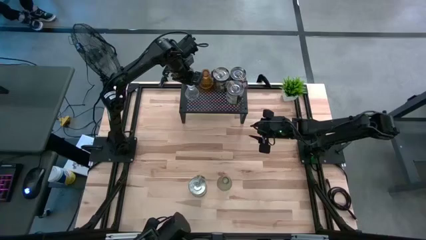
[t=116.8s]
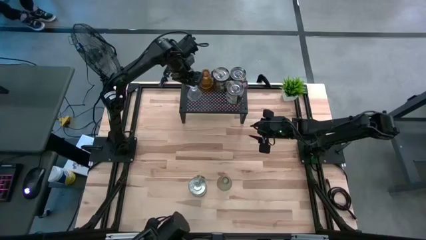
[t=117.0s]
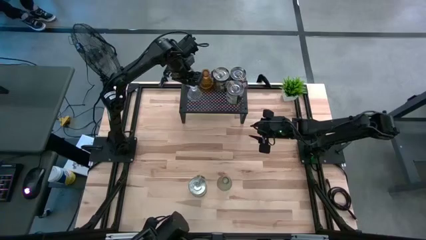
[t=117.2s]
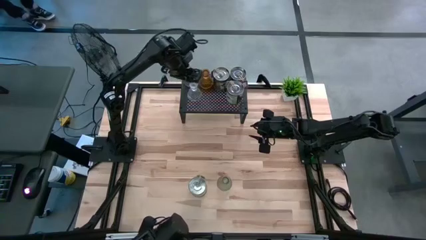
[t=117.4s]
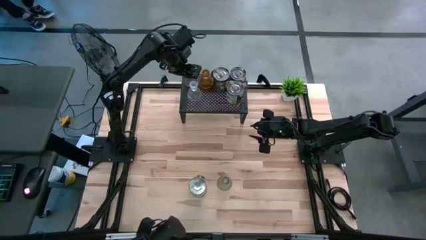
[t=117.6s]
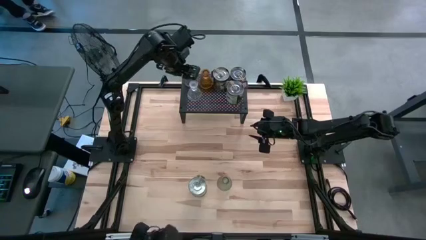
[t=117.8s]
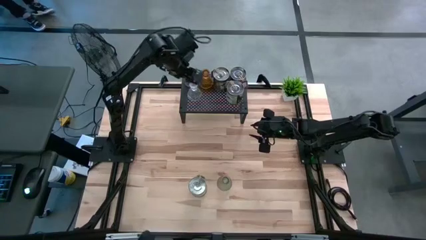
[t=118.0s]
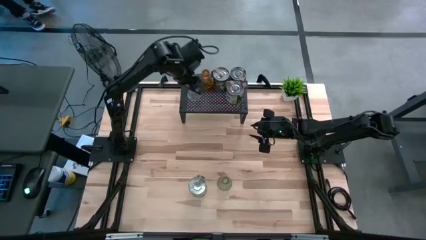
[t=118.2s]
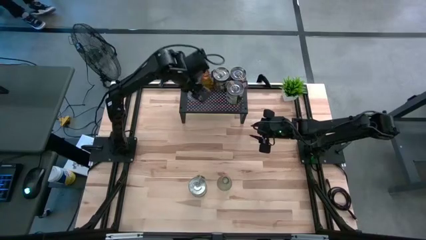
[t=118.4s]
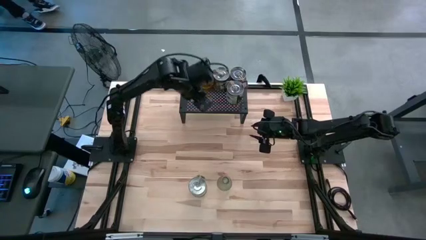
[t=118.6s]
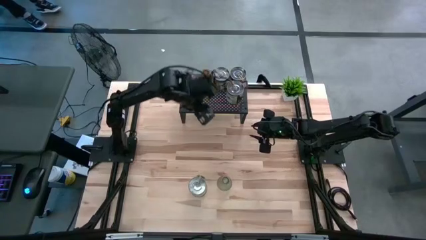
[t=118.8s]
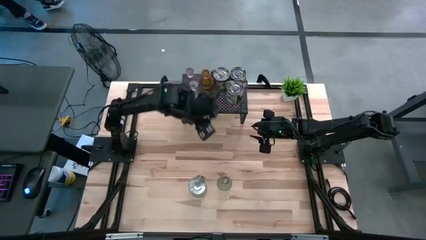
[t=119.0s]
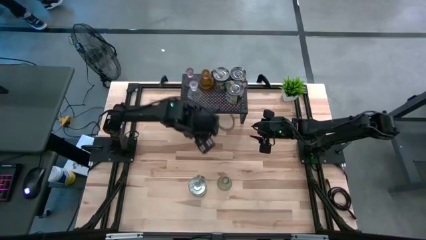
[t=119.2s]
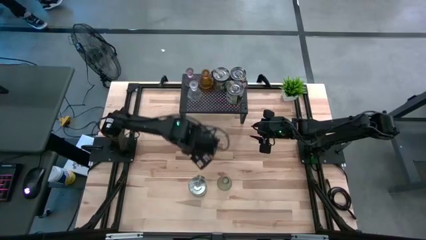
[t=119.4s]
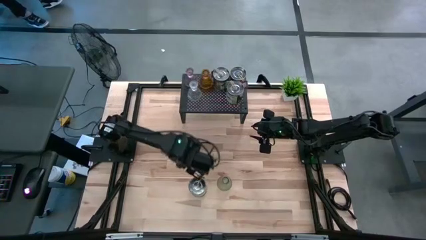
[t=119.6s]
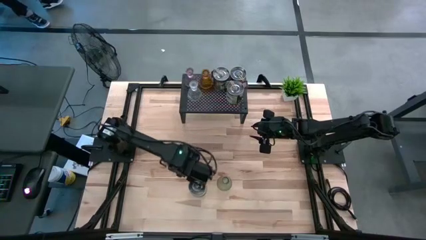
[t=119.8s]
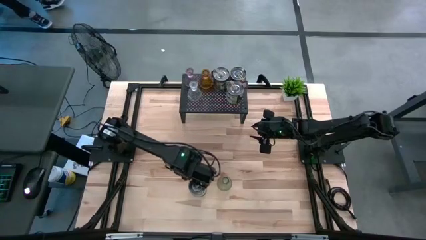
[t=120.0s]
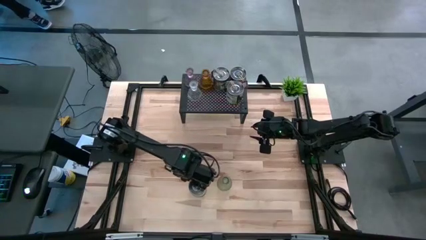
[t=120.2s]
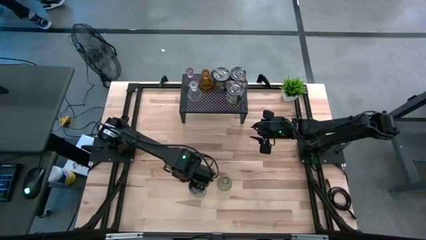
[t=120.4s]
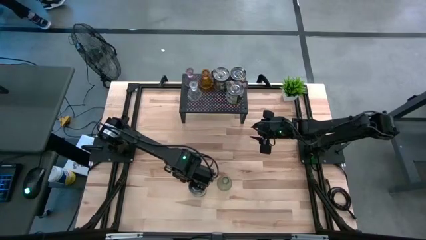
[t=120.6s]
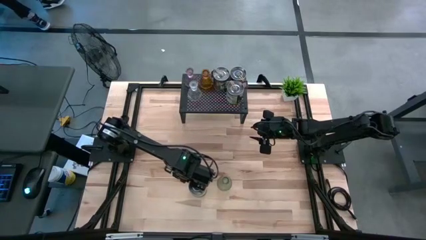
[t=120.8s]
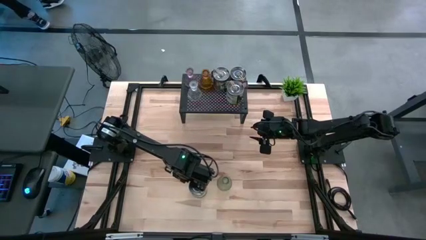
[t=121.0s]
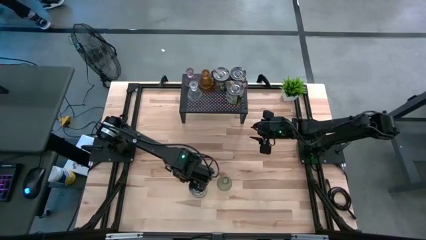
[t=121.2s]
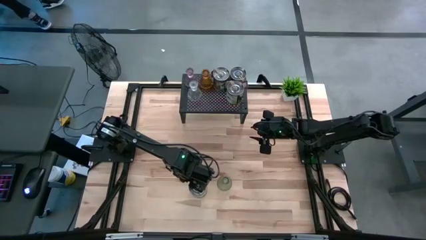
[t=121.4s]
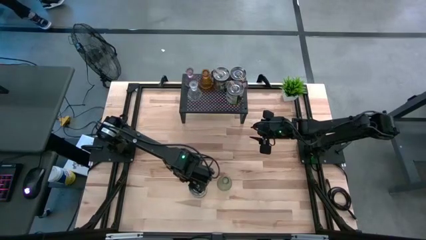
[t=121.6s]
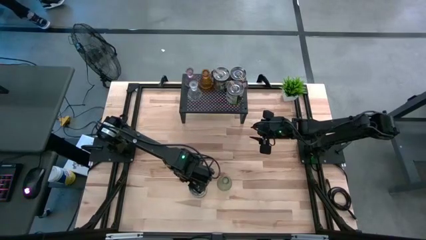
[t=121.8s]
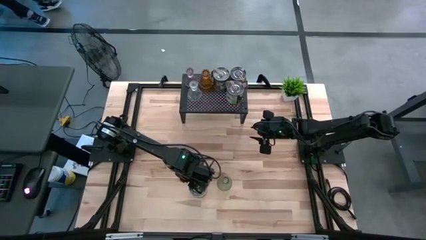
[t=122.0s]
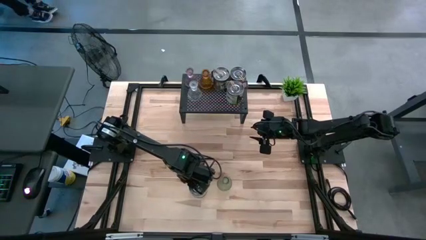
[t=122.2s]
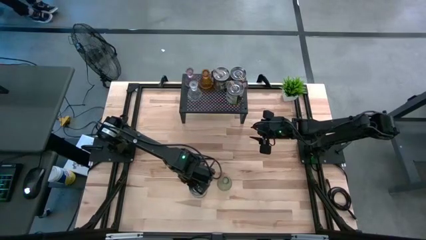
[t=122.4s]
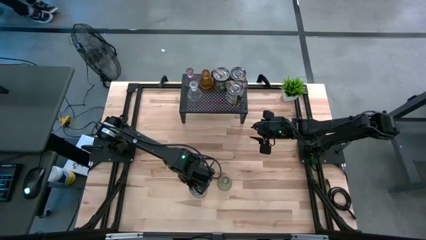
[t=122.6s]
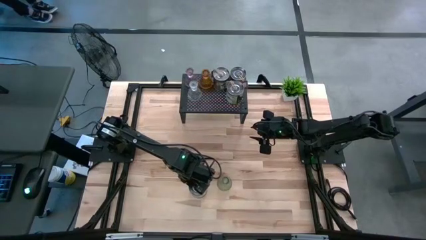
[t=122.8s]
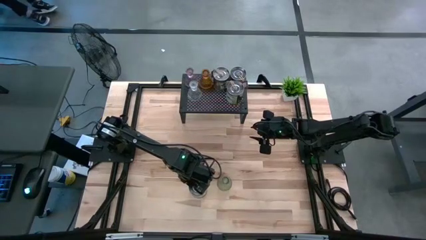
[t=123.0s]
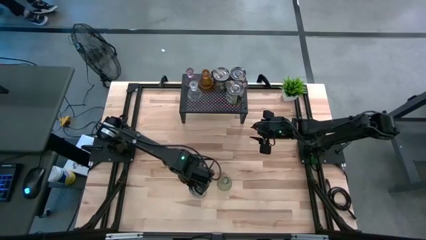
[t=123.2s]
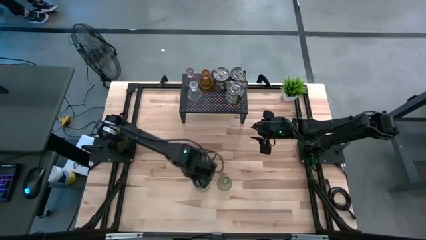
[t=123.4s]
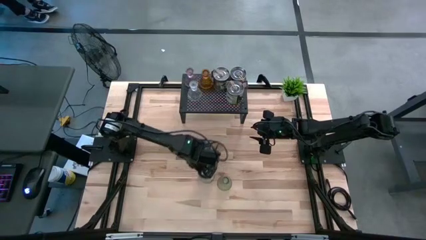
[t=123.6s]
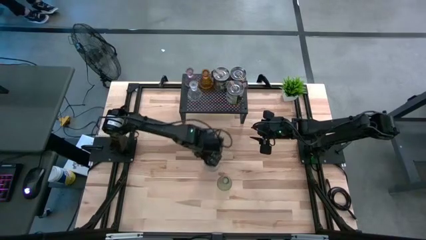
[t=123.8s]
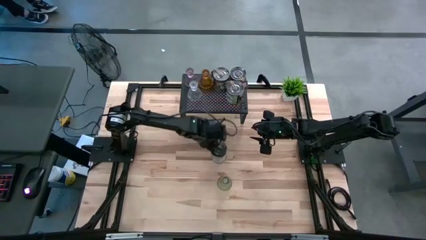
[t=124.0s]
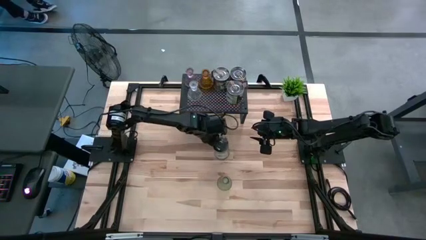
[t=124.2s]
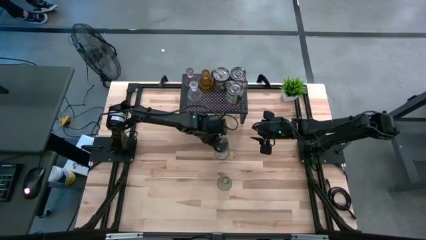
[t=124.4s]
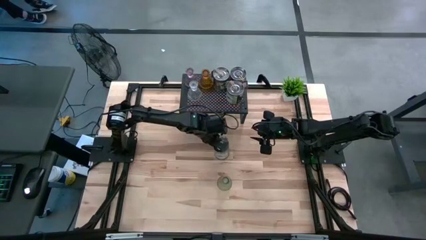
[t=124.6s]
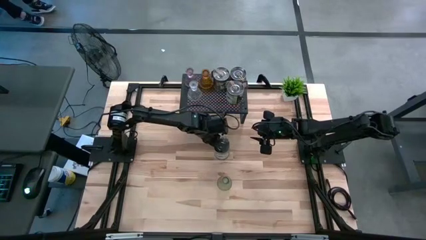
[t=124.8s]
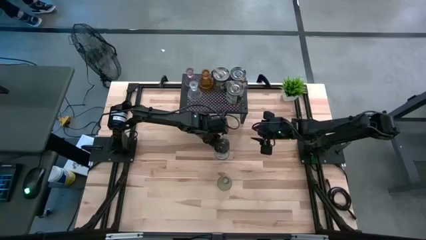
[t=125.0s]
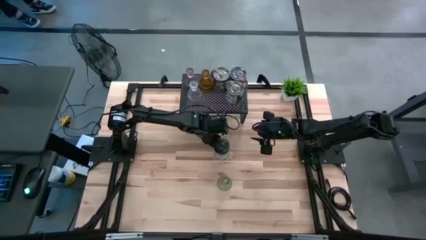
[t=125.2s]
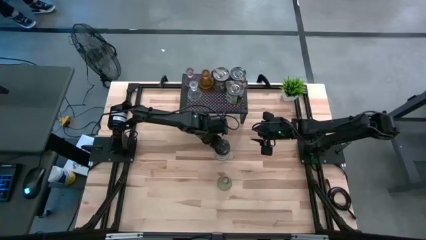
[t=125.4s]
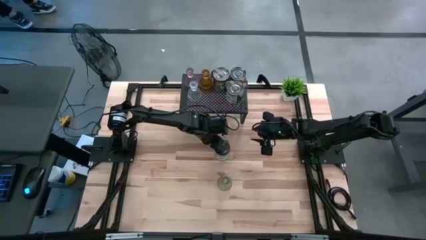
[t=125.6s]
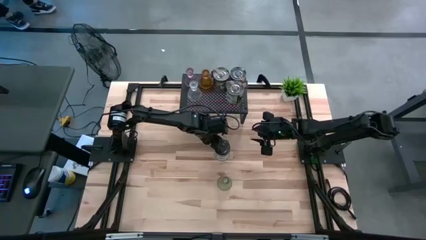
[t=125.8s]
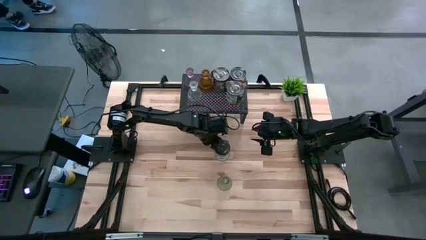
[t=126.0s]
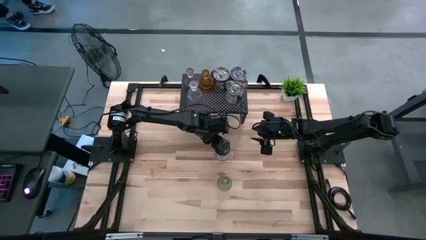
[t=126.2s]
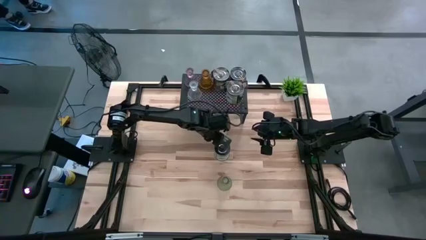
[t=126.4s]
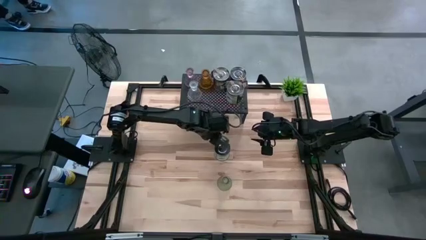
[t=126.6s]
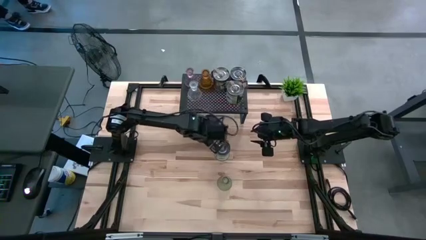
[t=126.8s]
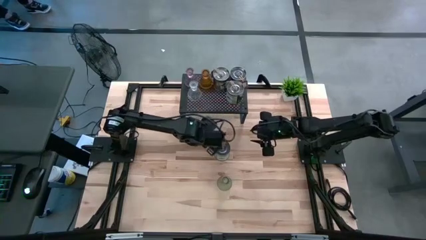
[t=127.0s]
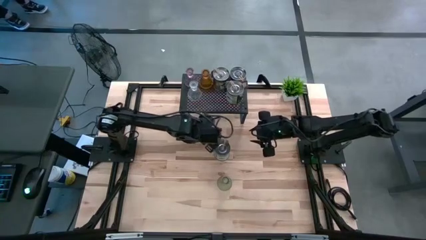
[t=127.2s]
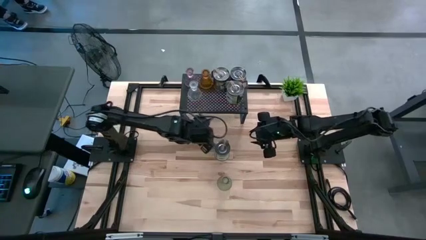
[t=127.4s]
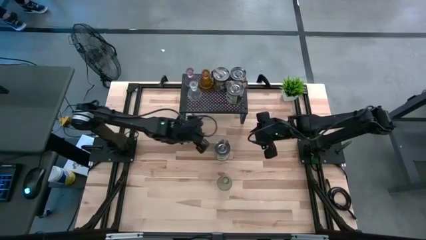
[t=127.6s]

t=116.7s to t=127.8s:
Task: Pick & Place candle stick holders
Put the green scented candle on the shelf aligned with the other scented candles
